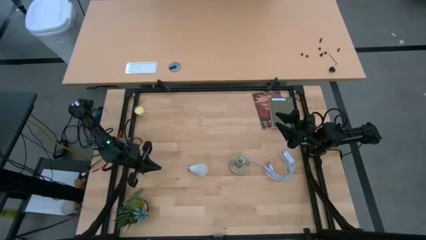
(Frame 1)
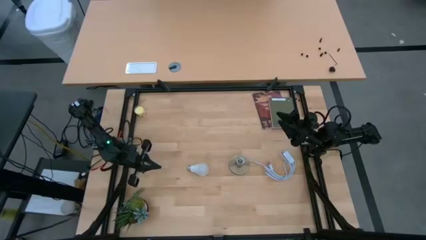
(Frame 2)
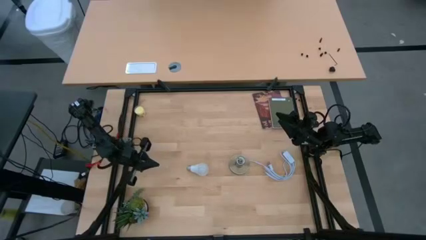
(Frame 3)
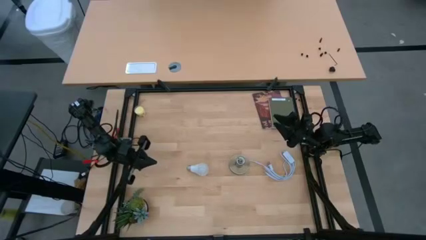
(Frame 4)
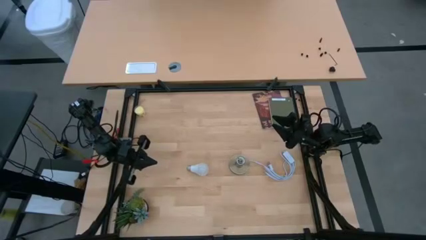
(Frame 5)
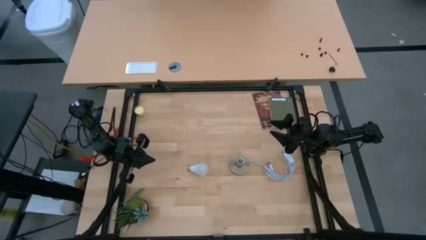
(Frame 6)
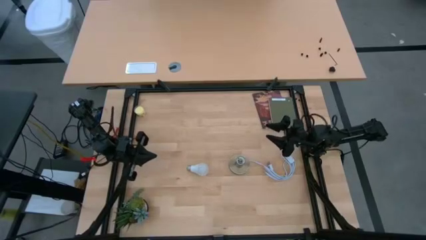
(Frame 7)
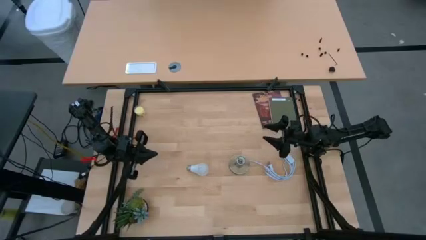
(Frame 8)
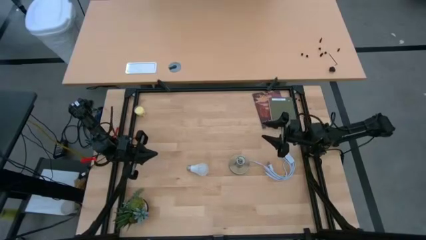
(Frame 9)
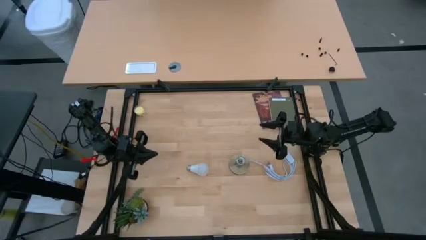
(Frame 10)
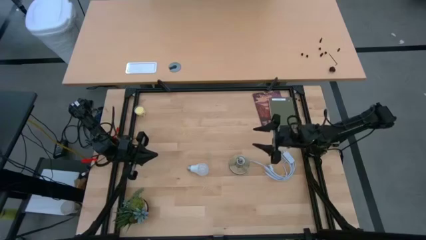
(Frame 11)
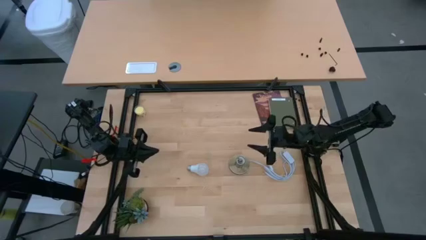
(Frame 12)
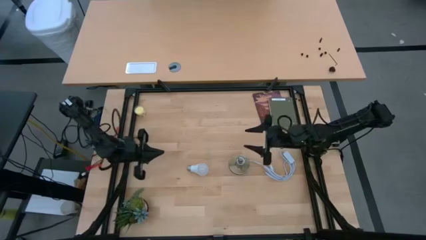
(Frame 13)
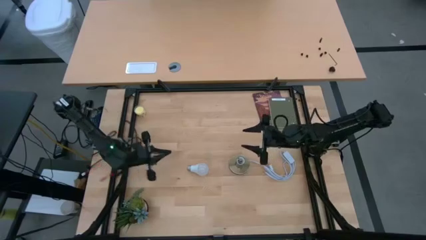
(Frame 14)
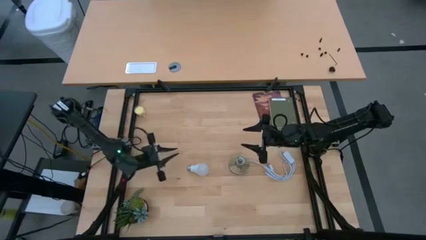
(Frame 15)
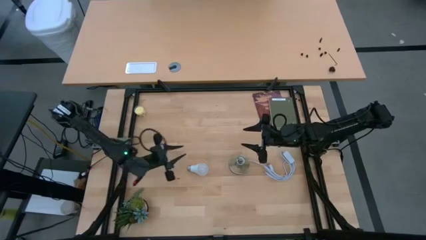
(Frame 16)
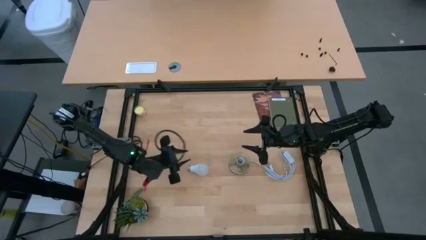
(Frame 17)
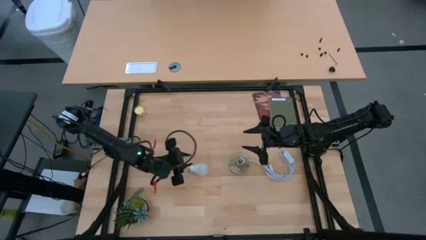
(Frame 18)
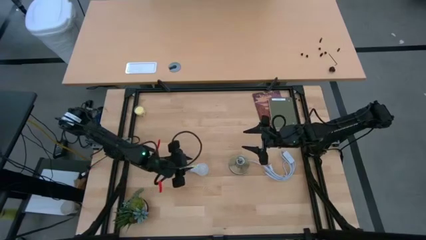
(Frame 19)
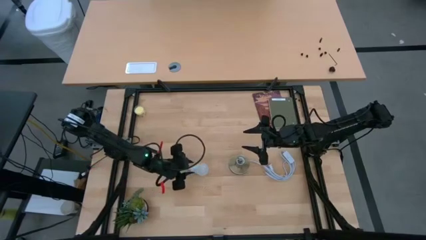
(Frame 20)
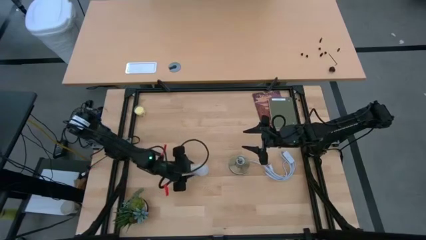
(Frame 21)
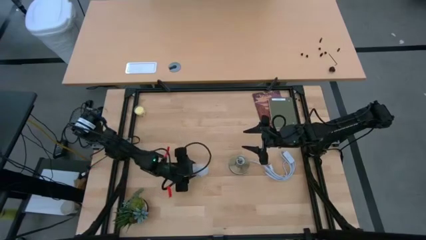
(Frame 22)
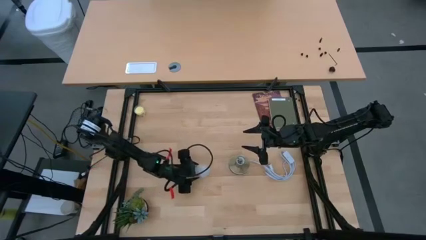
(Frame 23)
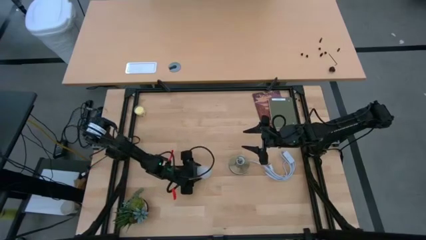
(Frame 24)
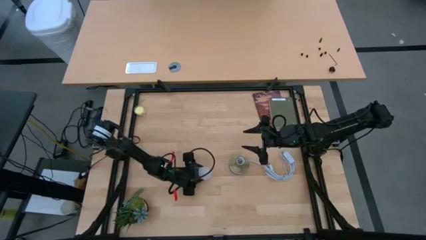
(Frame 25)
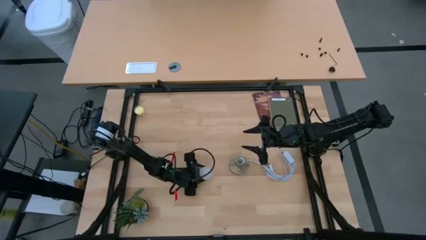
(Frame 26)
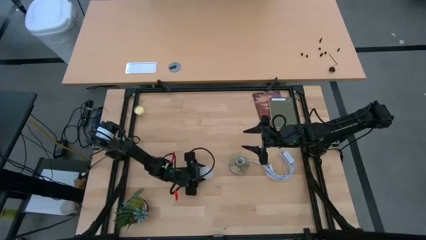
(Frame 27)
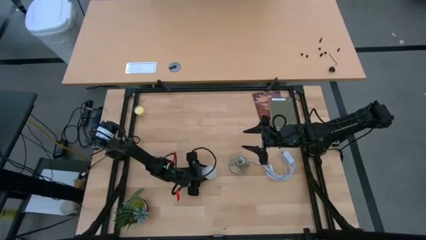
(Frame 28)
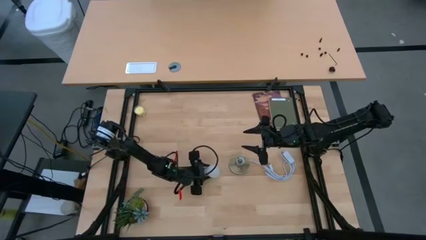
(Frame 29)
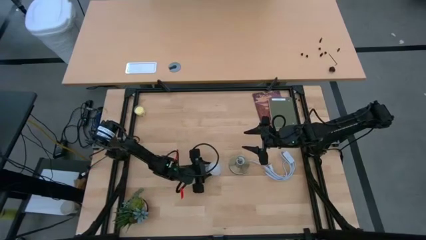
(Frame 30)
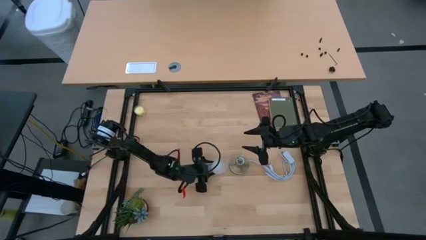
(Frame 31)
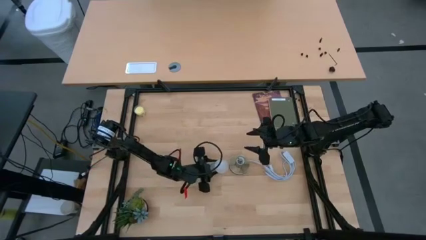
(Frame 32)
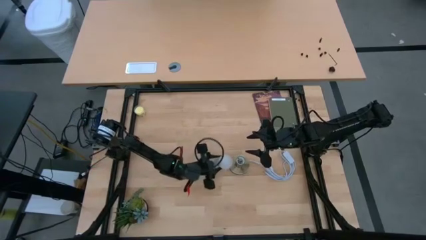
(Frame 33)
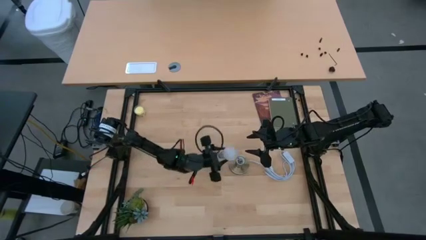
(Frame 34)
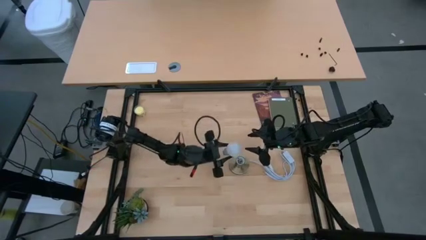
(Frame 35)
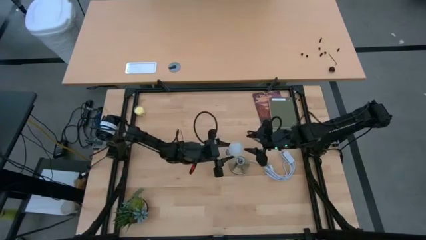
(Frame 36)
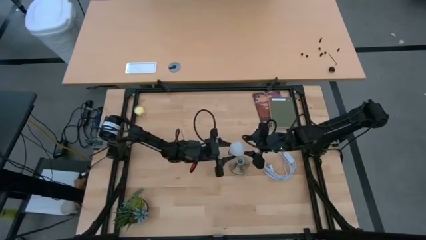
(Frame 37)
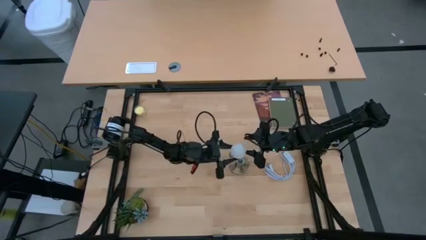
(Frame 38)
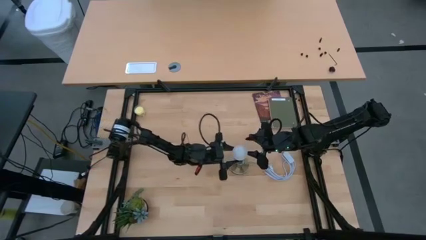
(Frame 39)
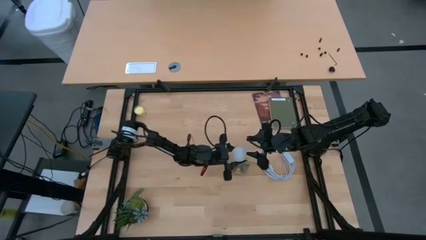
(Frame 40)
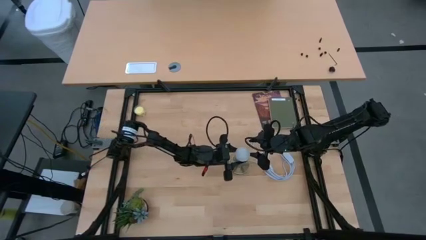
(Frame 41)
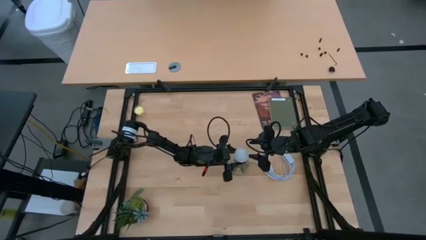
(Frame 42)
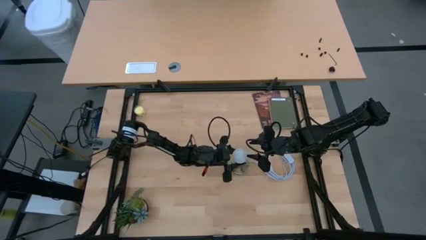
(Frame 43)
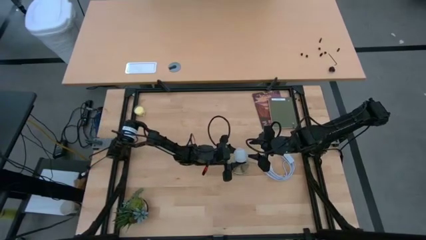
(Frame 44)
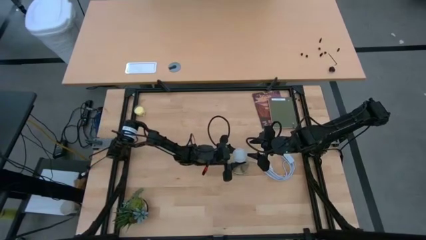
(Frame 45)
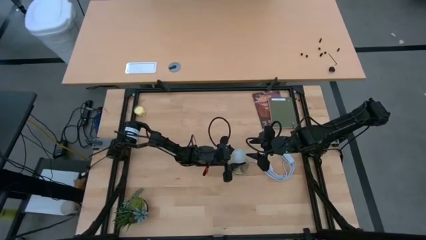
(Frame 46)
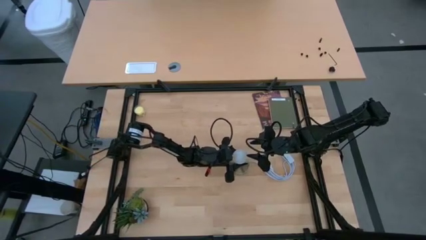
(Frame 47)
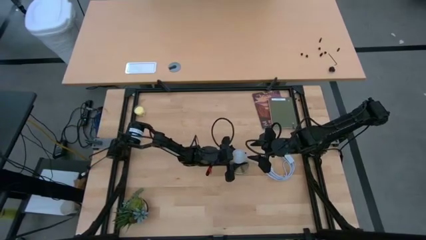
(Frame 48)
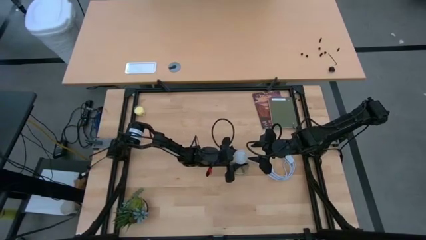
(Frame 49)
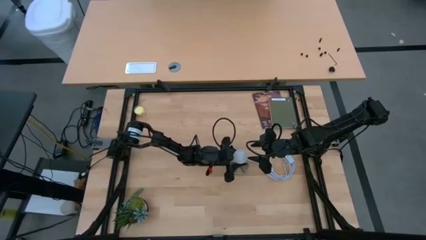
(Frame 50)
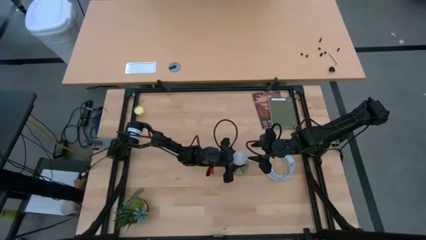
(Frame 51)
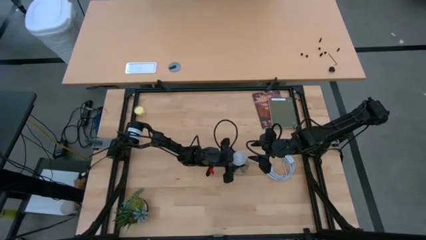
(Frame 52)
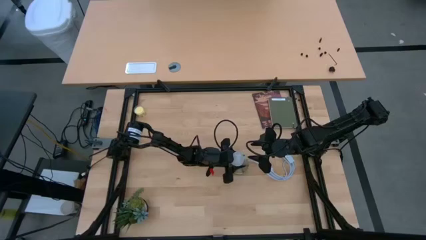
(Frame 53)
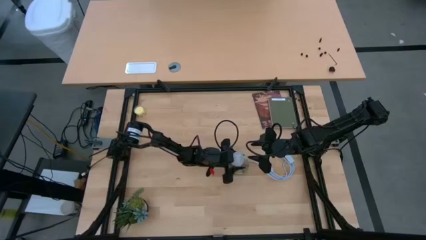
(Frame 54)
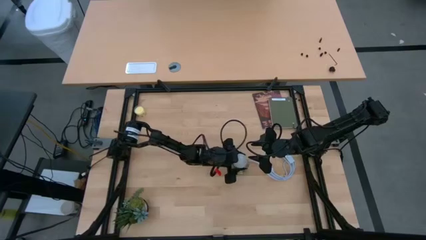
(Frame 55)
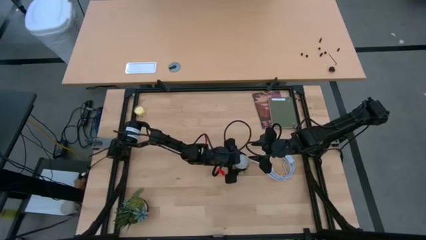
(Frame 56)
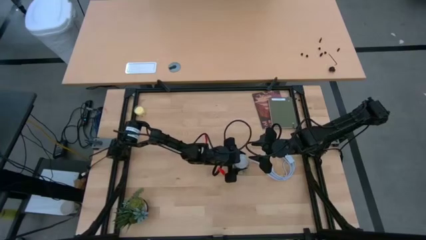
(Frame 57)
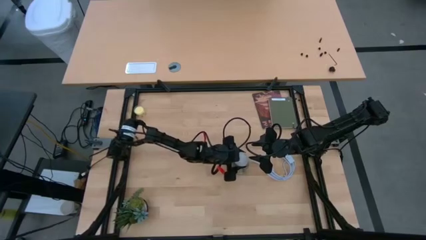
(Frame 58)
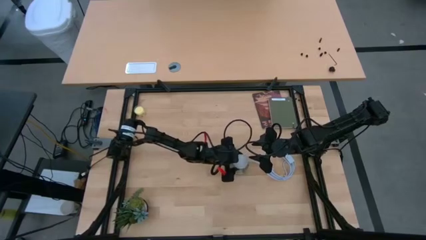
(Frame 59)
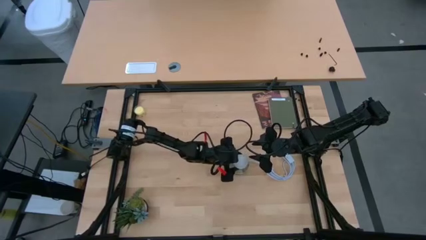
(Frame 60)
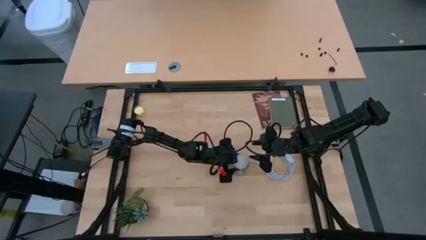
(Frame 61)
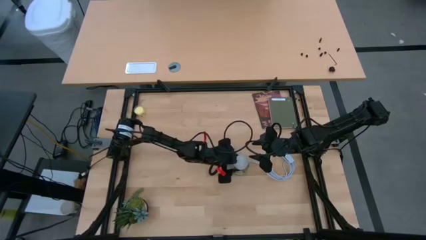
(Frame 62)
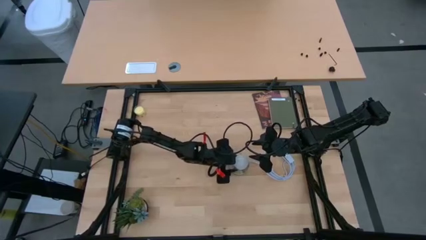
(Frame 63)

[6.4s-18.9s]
Task: Screw lightbulb
Insert the lightbulb into the lamp
